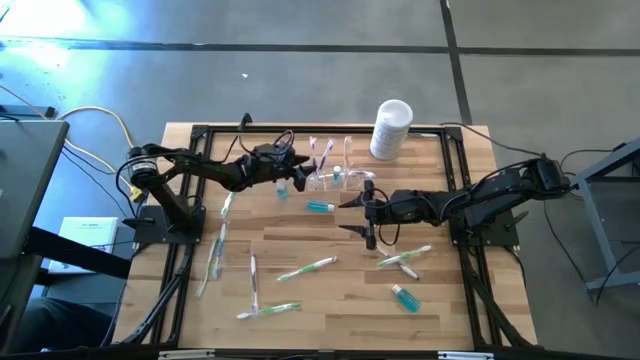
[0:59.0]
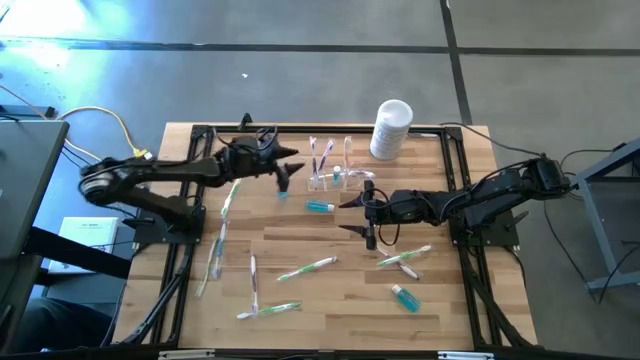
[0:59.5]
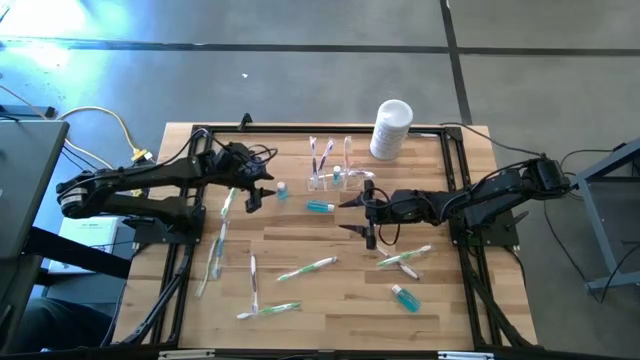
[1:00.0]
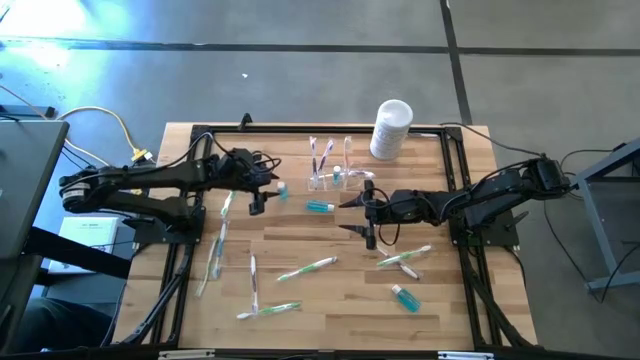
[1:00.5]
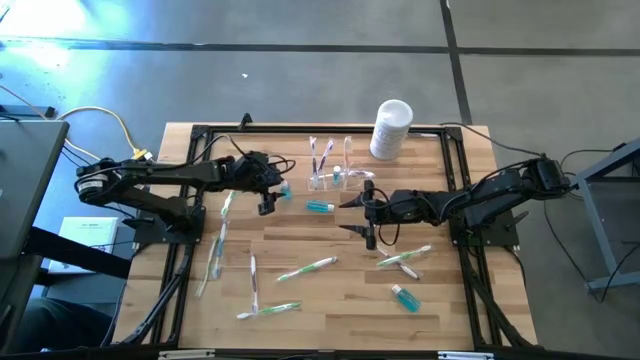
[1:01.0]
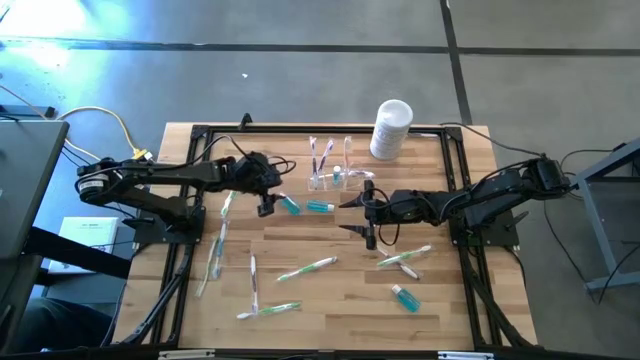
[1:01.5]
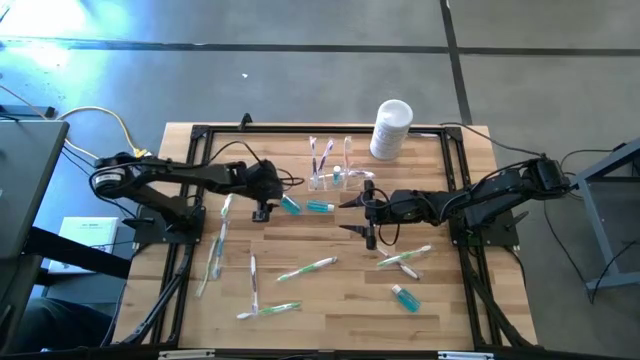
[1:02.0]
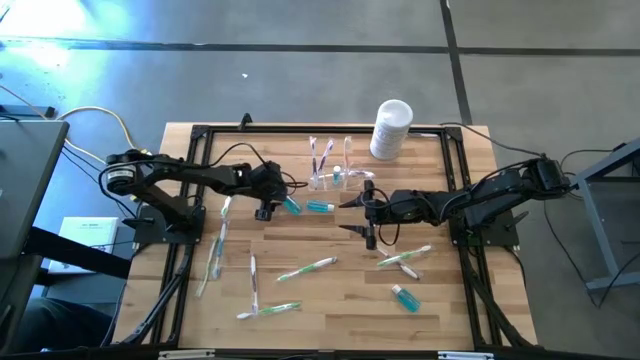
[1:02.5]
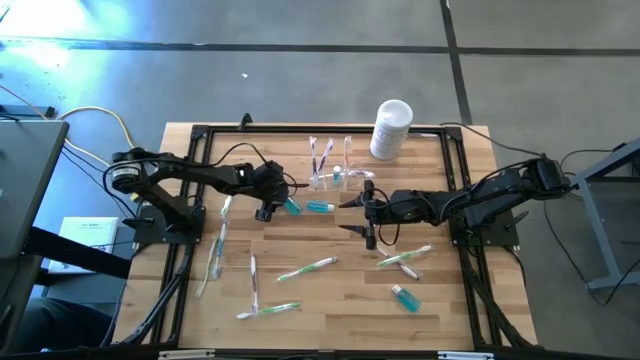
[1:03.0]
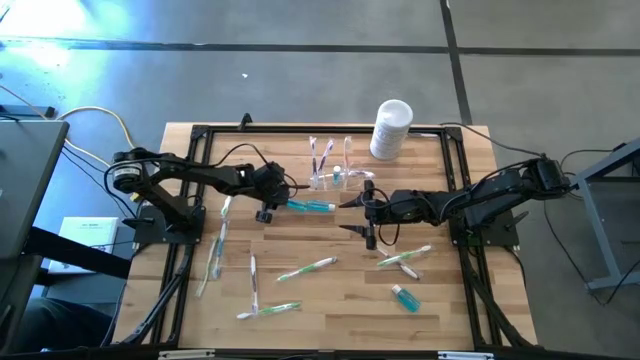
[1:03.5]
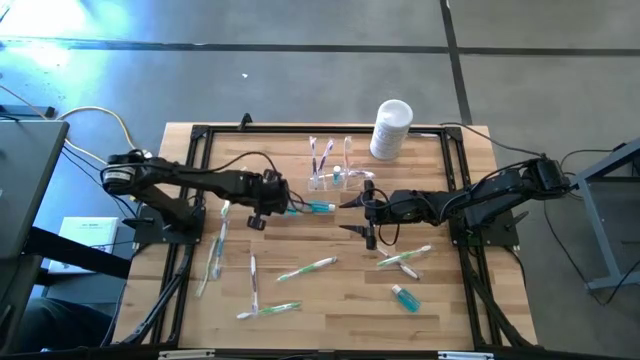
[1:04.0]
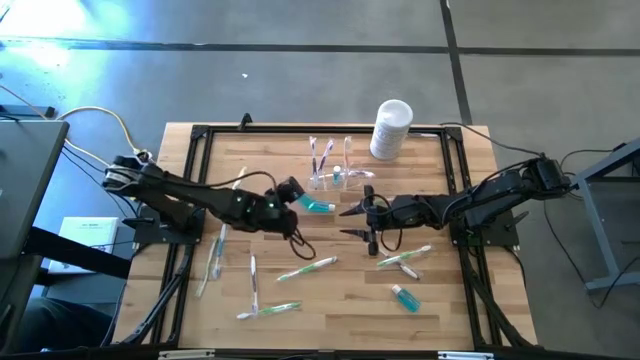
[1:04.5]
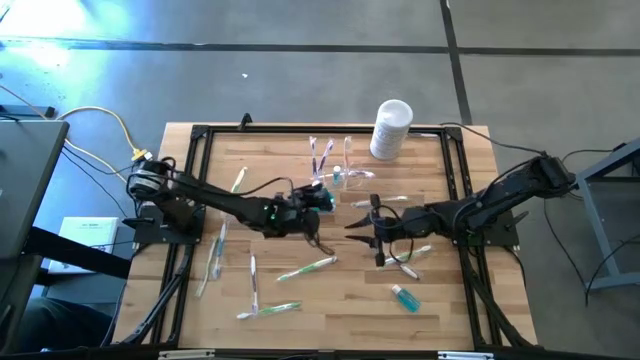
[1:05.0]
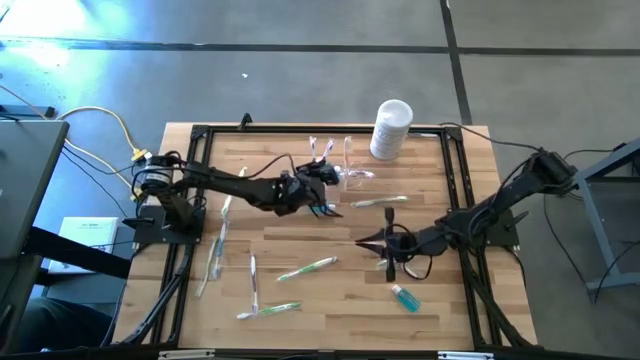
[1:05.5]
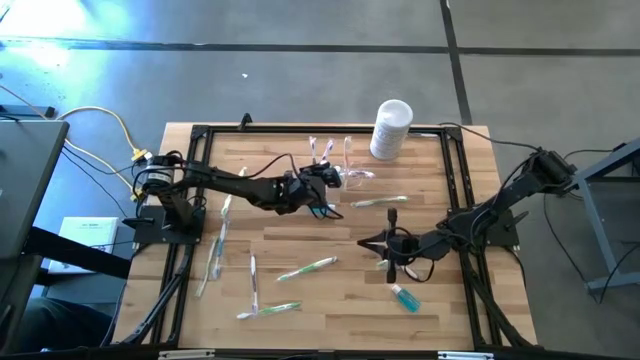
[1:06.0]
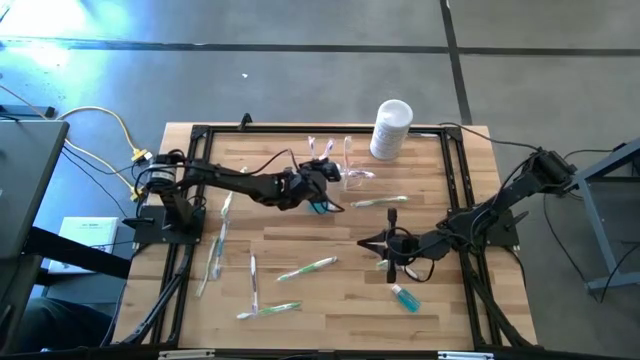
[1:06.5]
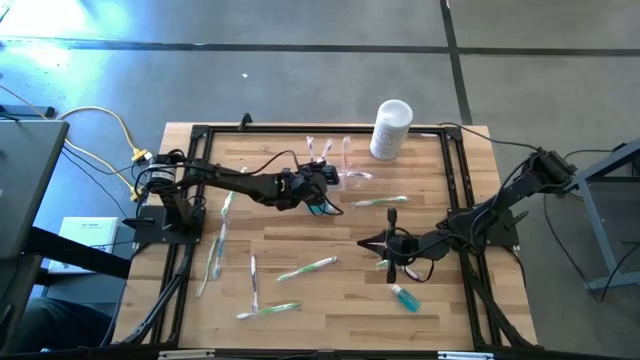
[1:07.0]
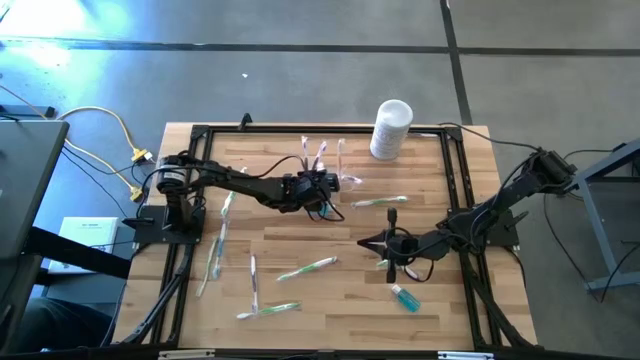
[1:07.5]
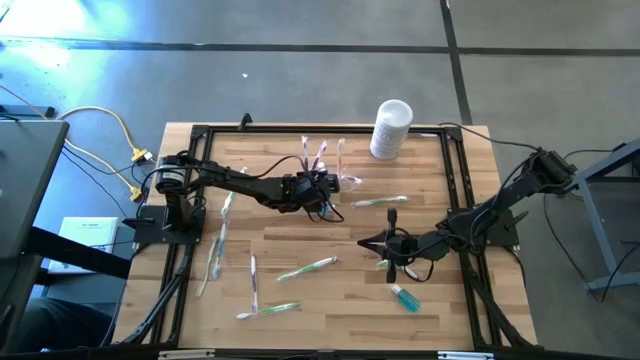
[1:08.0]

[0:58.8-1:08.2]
Task: Pick & Place toothbrushing station
Put the top left blue mouthwash into the transparent organizer

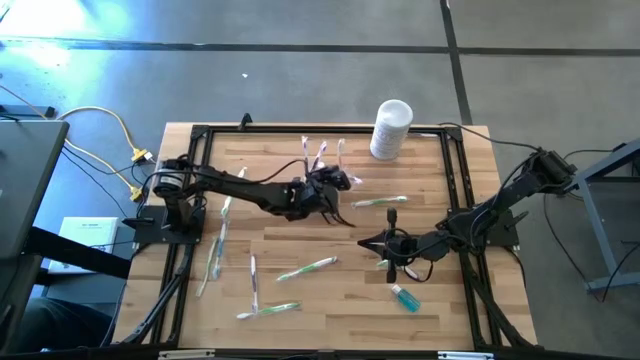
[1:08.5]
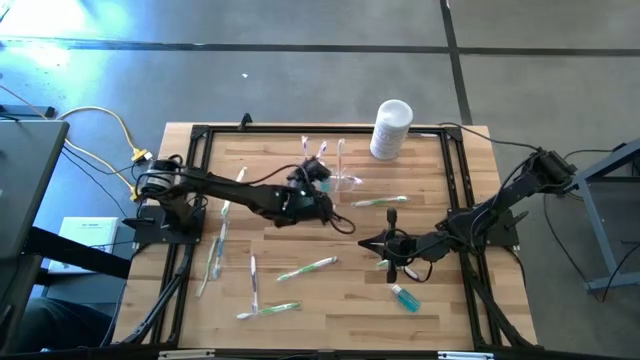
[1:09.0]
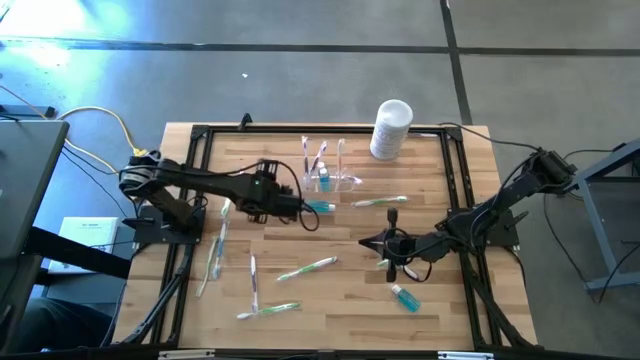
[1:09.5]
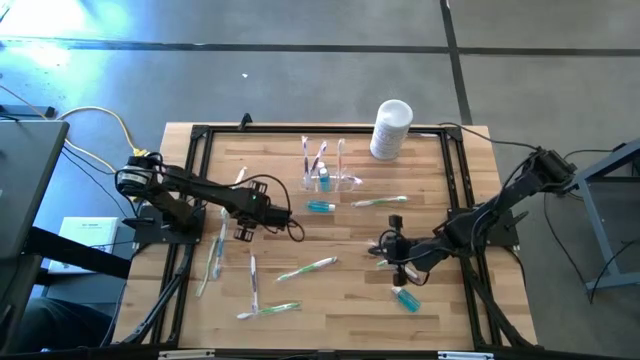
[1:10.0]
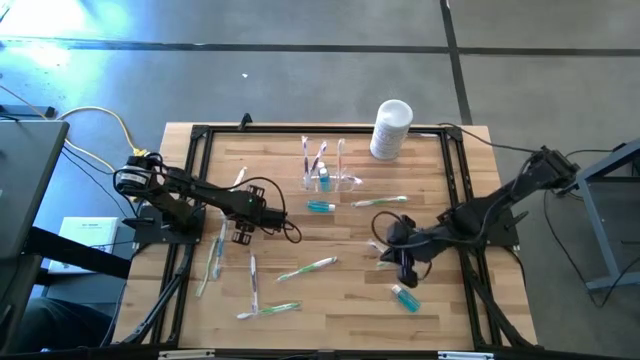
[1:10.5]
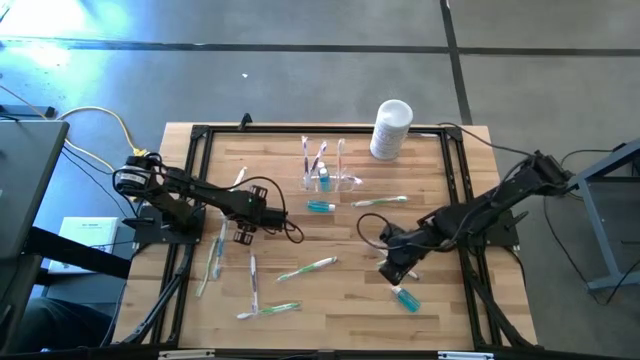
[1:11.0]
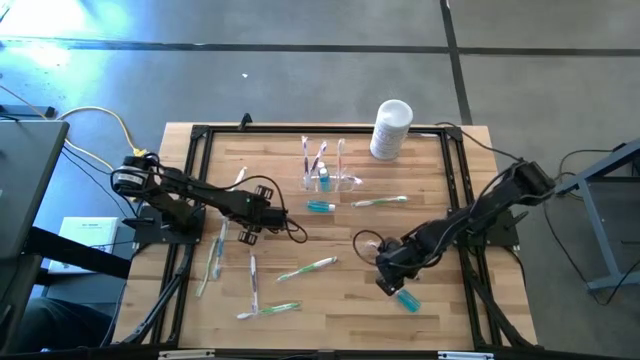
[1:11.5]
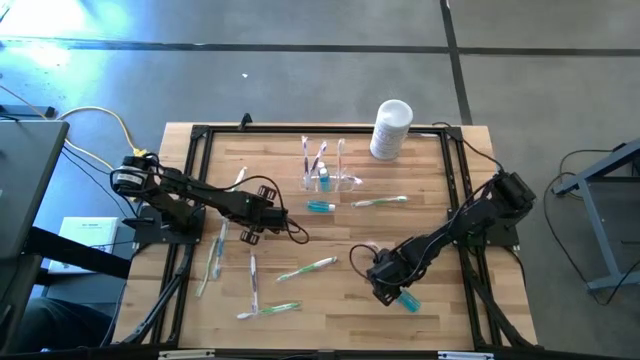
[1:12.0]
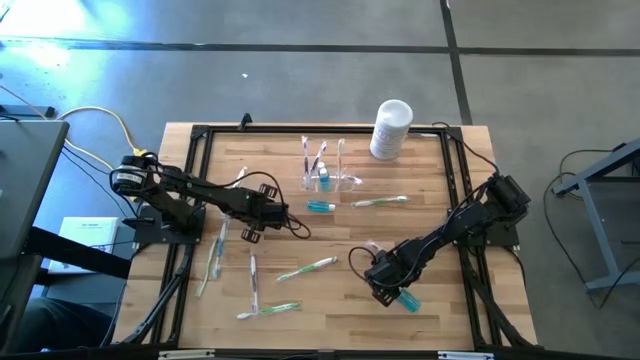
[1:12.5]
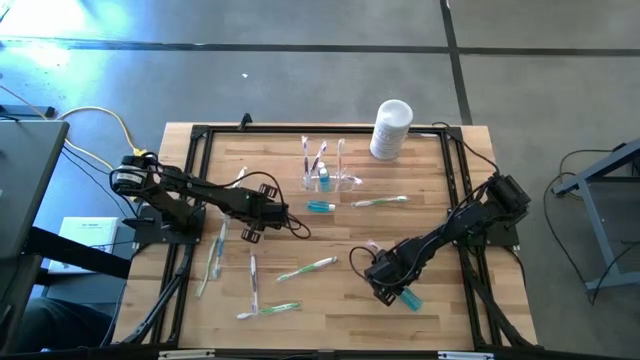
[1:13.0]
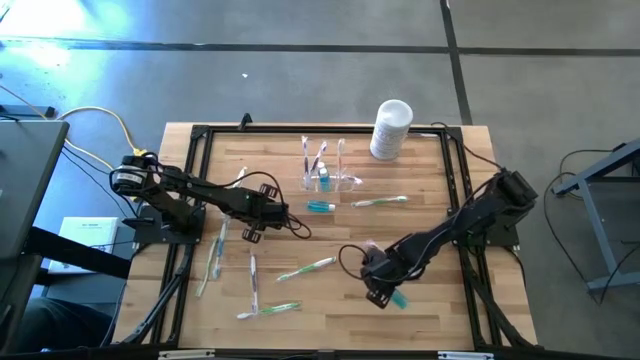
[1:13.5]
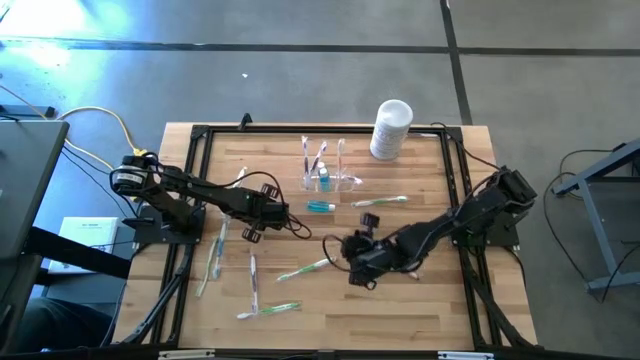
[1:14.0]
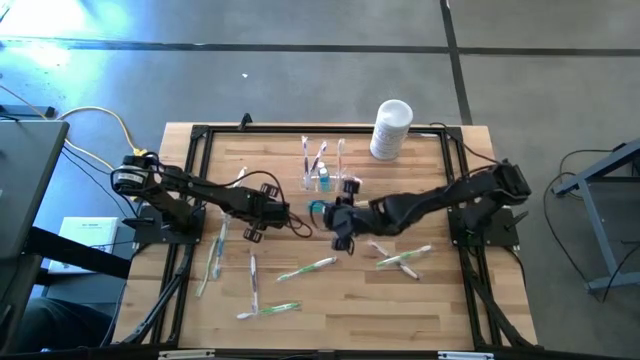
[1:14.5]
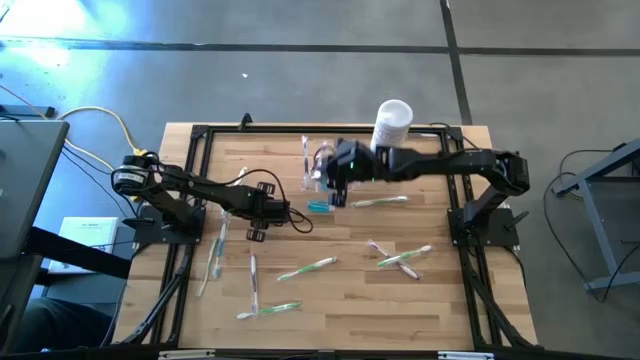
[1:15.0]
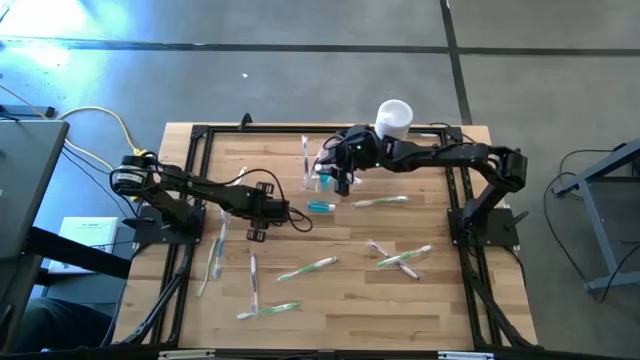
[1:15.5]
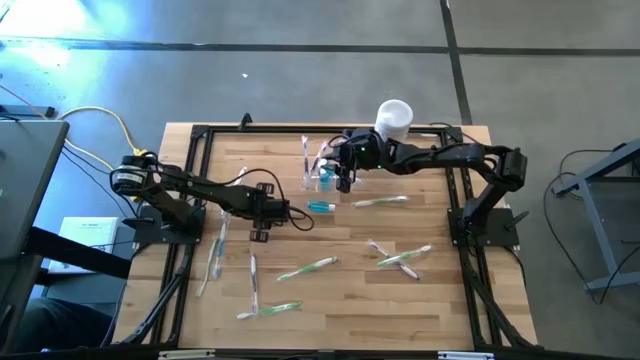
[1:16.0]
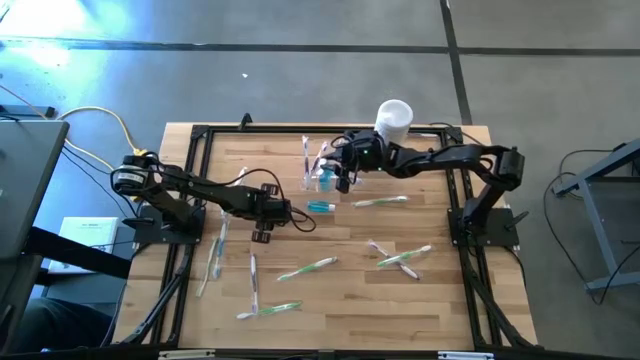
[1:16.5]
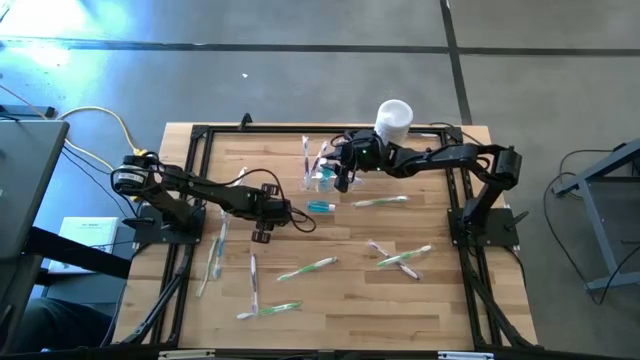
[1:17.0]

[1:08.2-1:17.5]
Put the bottom blue mouthwash into the transparent organizer

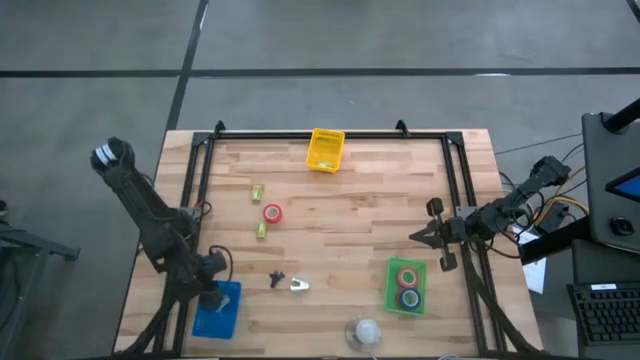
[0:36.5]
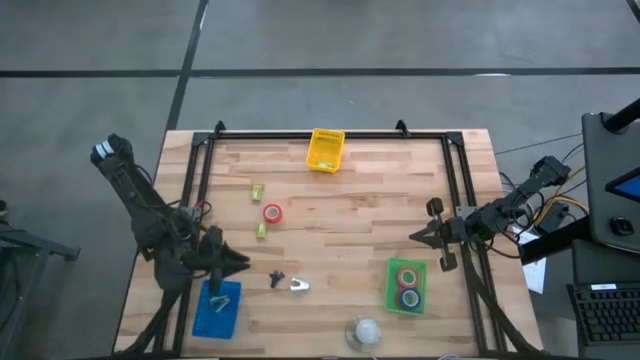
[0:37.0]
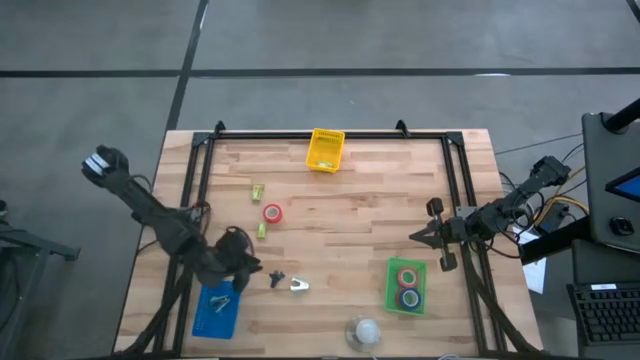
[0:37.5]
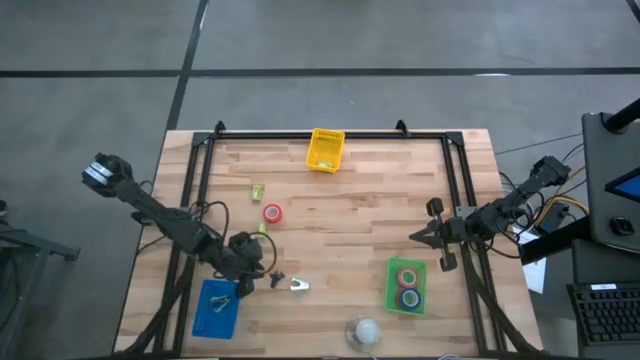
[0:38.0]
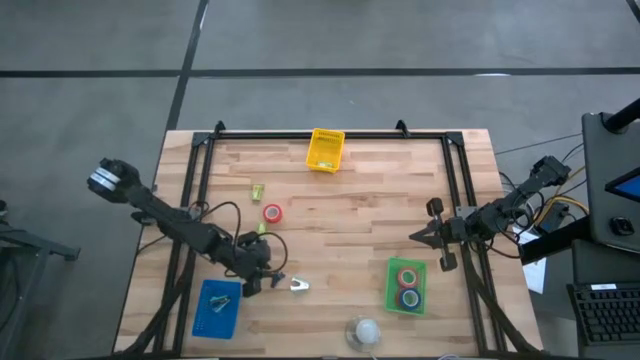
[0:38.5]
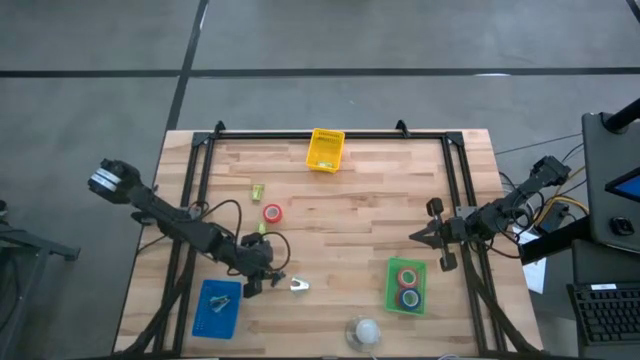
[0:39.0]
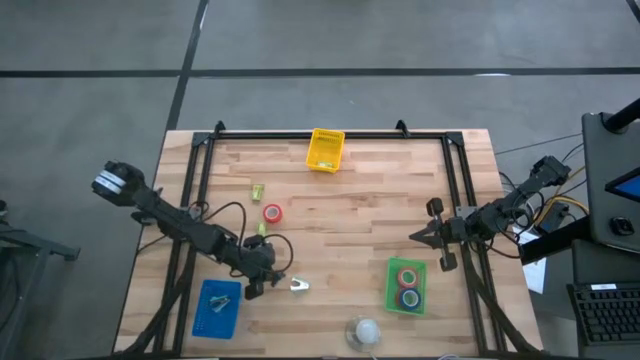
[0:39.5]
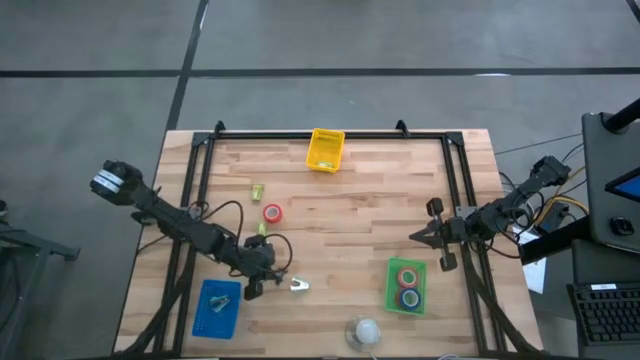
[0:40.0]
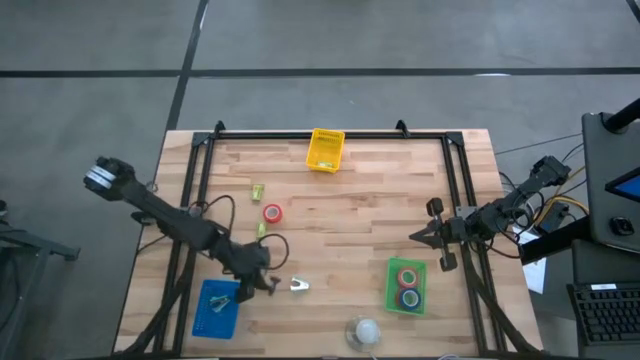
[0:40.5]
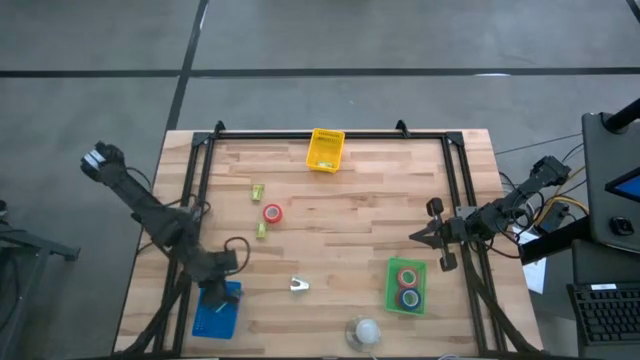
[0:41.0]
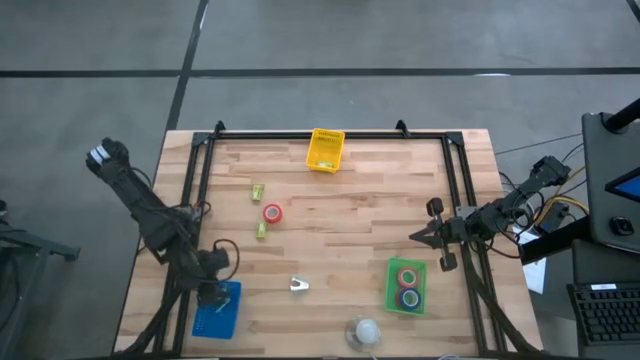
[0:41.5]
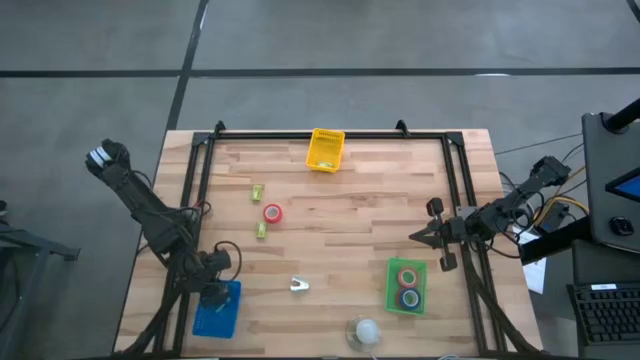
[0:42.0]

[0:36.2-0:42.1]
Task: Pick and place Stapler, Stapler remover, tape
Put the black staple remover into the blue bin
